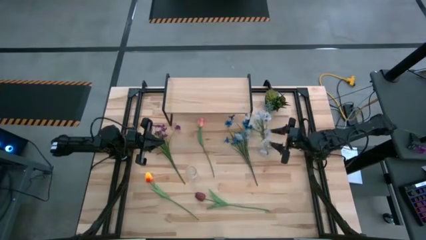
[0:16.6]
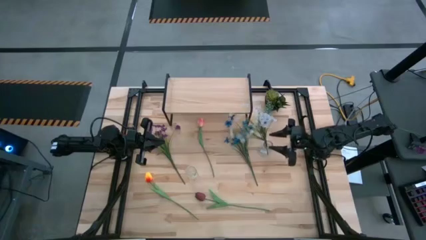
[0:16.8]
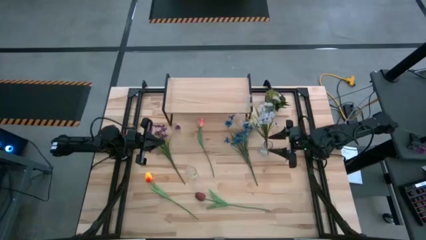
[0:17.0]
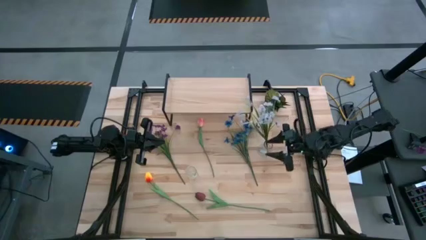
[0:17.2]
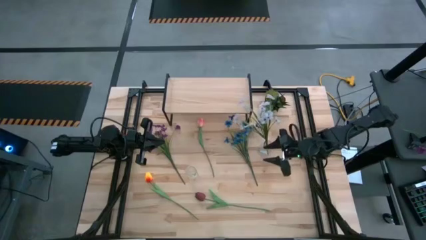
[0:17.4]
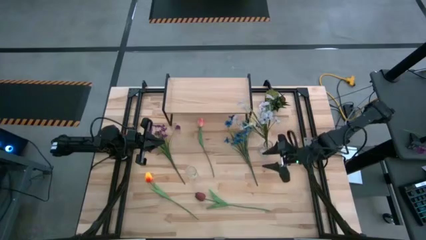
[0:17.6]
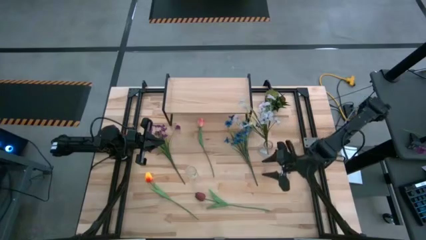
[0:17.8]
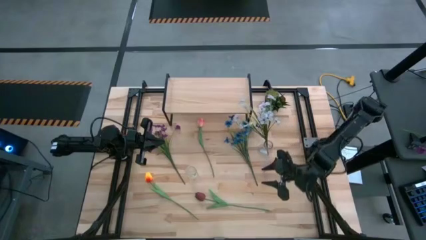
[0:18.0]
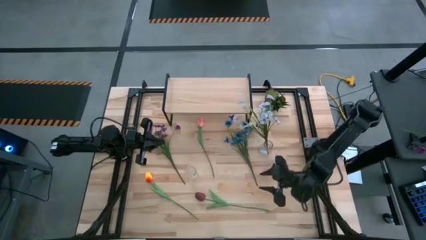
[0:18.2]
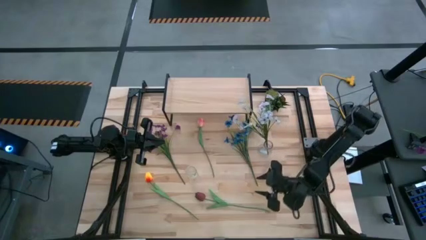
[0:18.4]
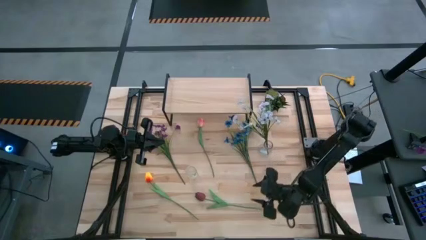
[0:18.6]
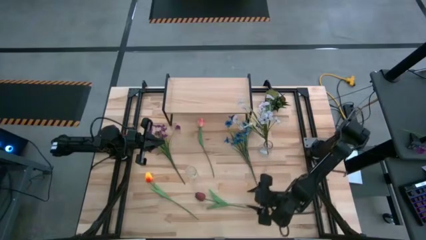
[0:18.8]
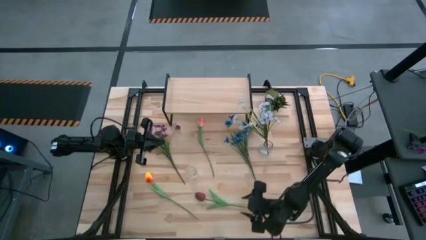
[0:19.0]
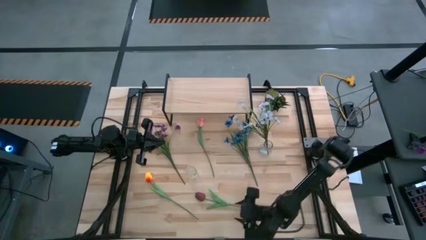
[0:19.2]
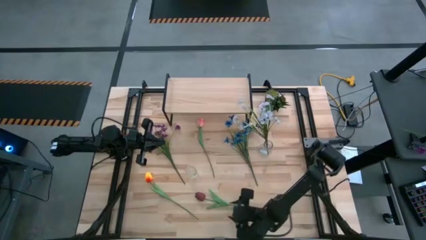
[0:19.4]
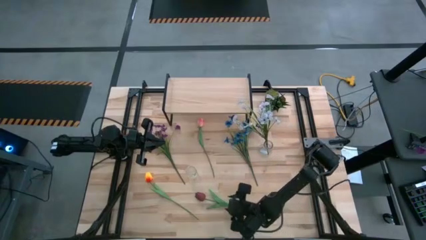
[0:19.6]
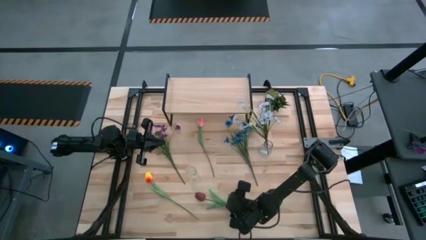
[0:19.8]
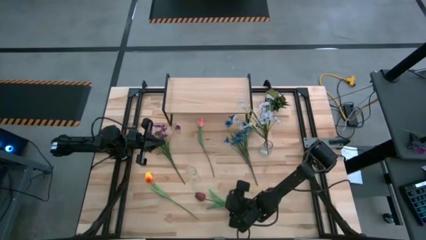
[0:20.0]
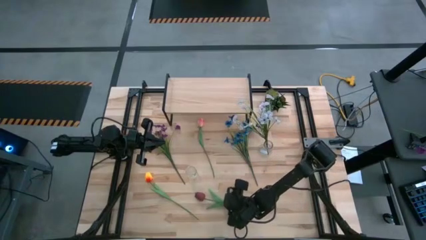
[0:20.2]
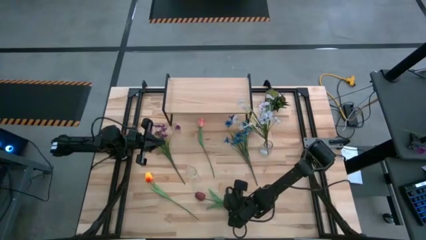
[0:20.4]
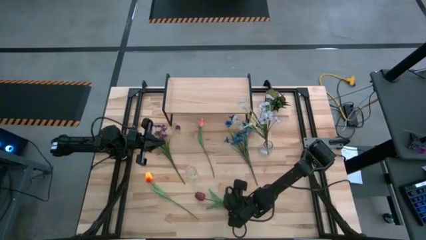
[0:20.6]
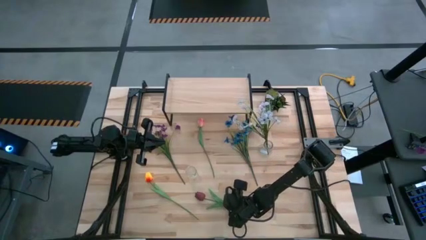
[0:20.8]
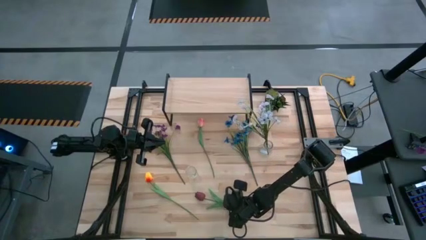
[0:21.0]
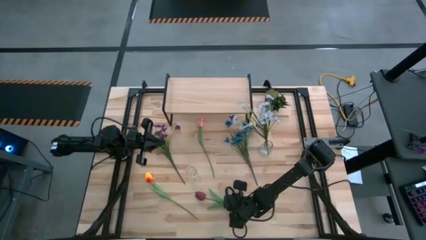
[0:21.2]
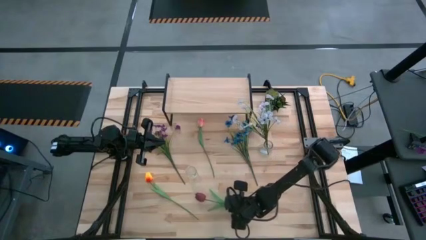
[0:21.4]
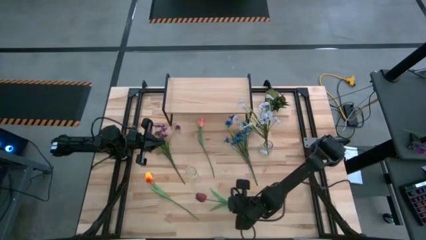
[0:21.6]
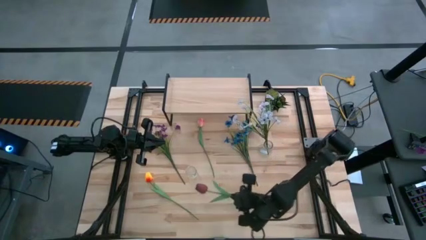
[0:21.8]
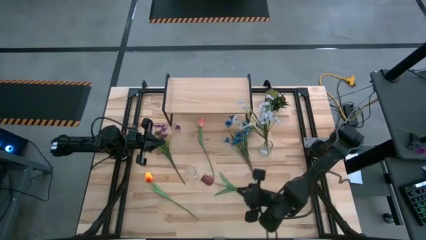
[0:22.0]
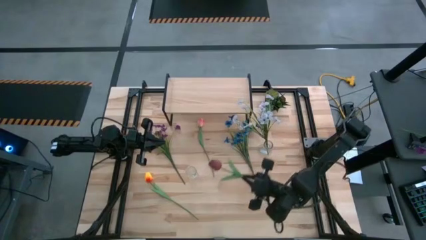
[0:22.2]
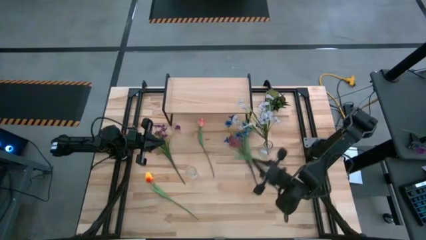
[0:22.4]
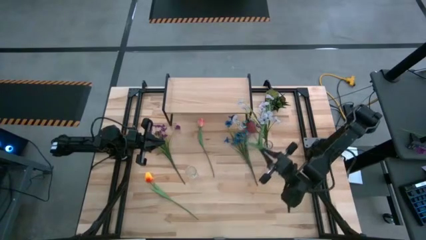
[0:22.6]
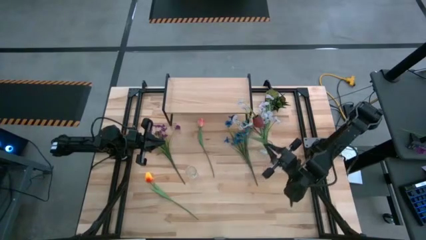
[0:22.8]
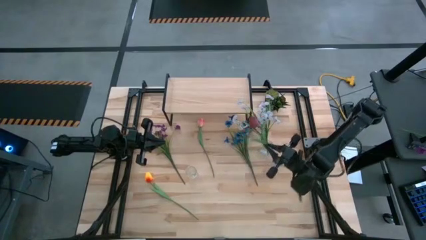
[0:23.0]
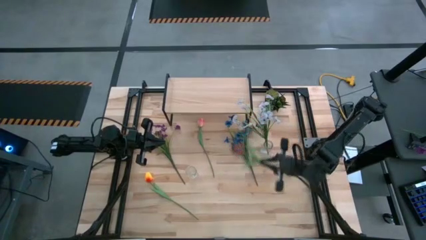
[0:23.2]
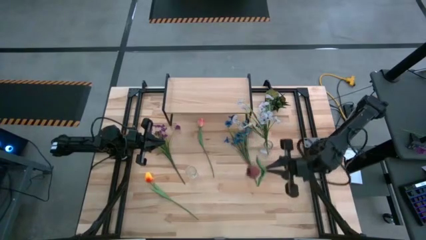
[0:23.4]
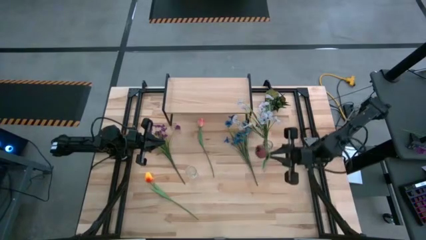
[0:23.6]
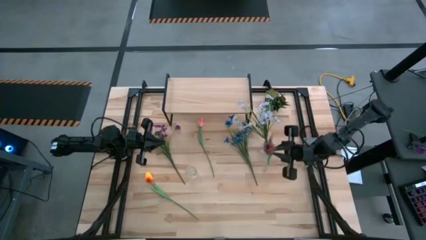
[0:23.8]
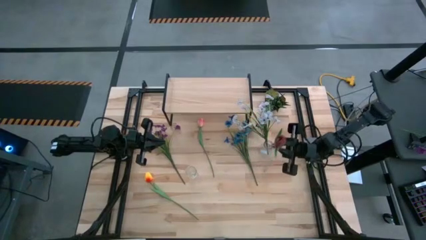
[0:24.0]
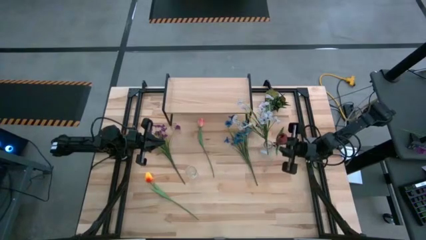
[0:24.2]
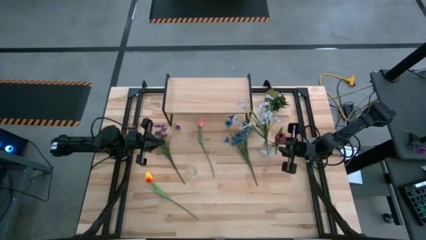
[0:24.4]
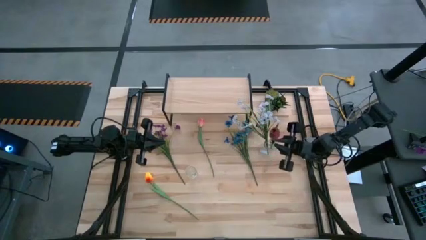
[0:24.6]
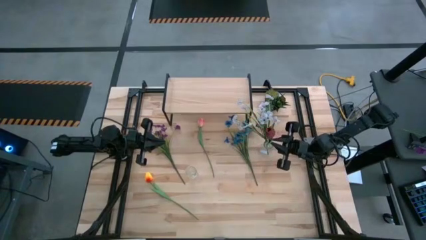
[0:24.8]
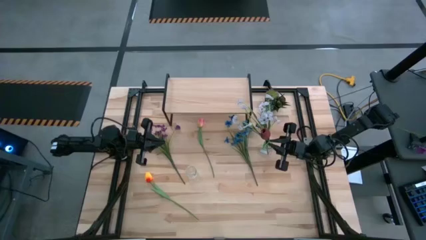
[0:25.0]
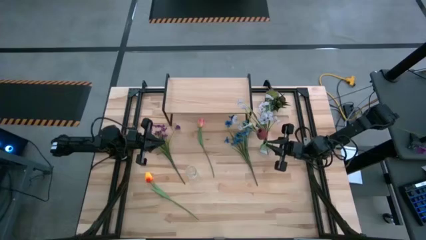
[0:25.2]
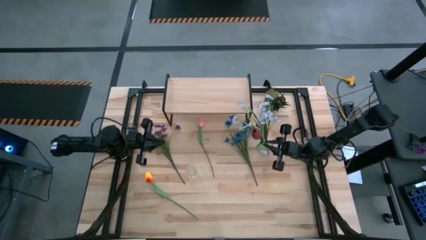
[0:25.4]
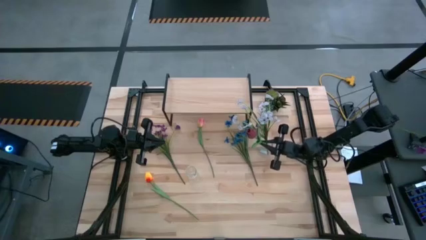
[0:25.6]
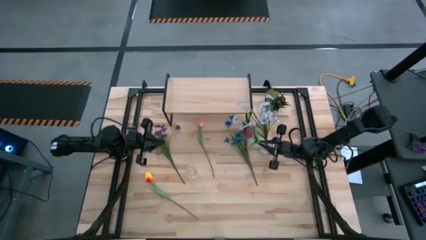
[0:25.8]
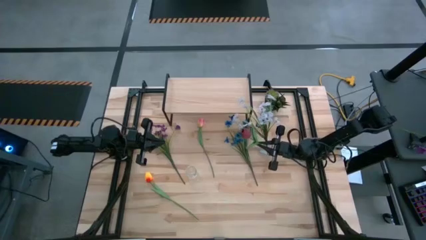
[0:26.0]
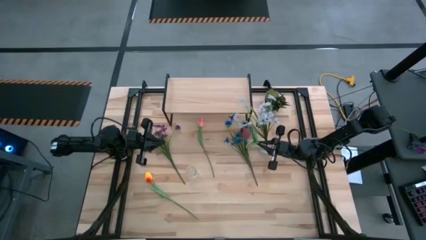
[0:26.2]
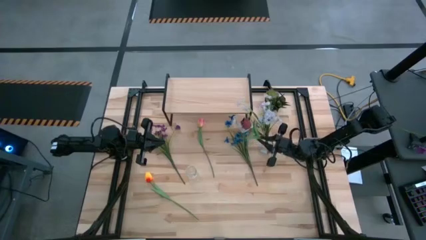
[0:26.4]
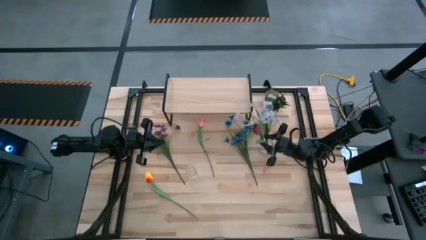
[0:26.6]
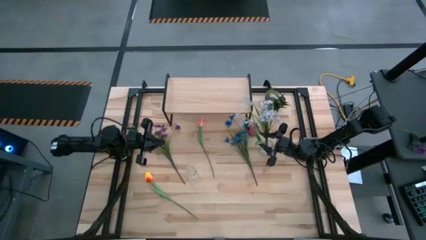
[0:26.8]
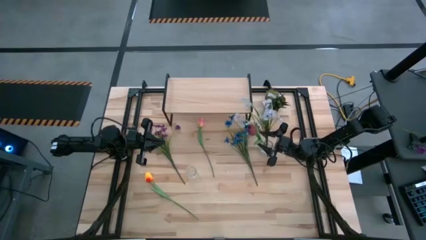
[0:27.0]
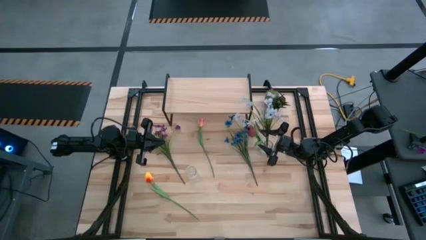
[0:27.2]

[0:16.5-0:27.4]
Task: Pick and place flowers into a vace then onto a shelf
Put the red tulip into the right crystal vase
